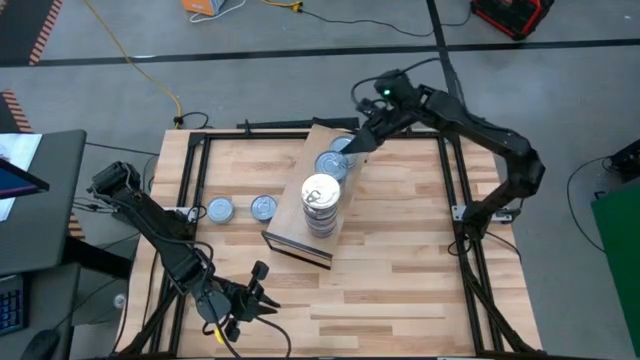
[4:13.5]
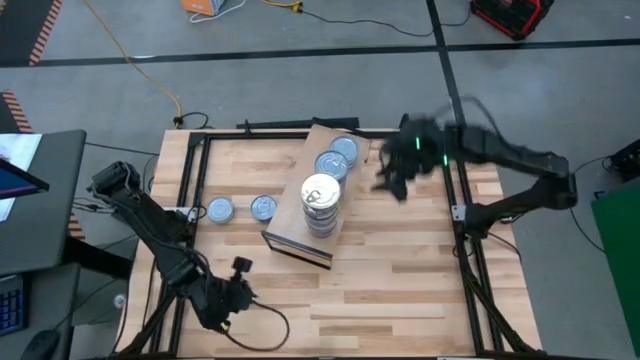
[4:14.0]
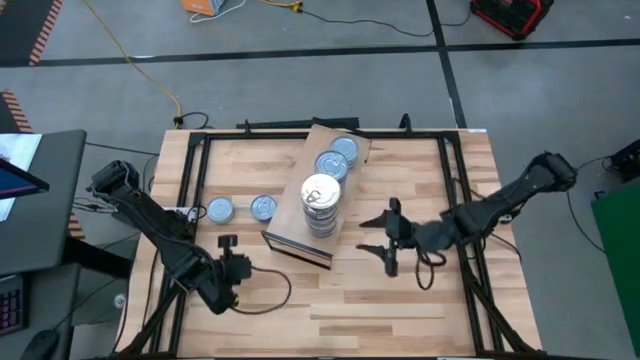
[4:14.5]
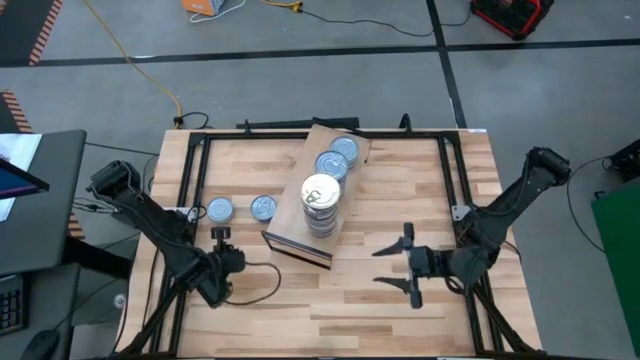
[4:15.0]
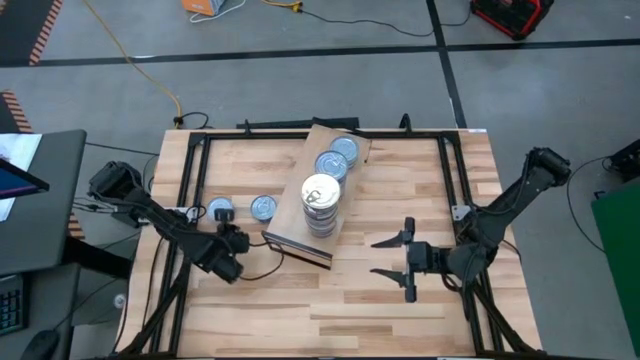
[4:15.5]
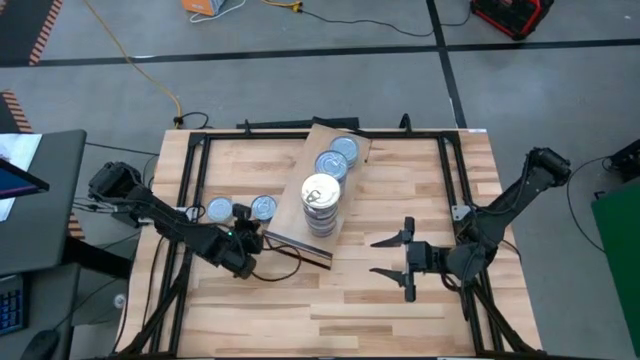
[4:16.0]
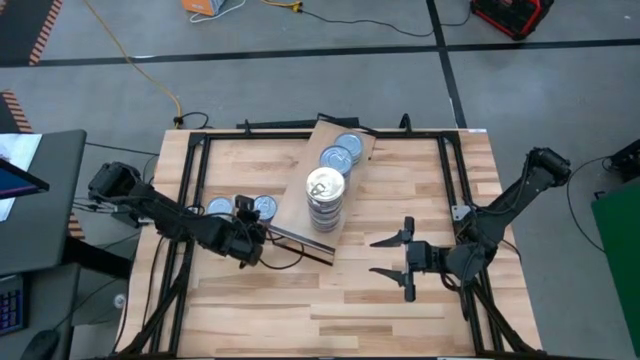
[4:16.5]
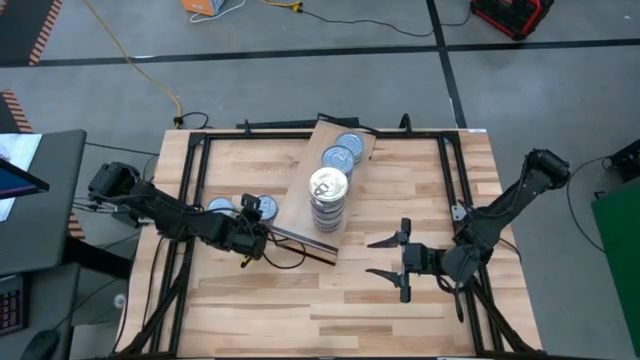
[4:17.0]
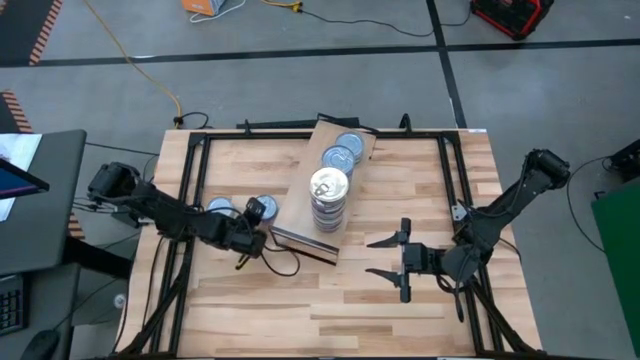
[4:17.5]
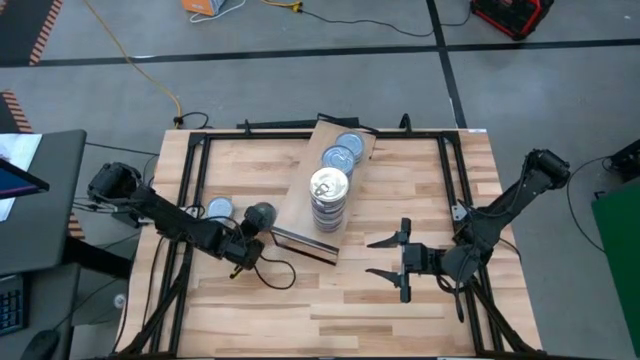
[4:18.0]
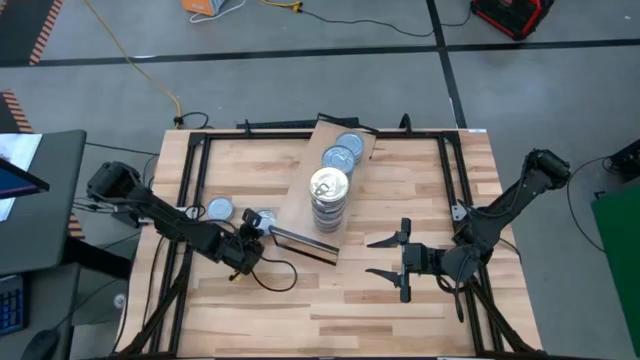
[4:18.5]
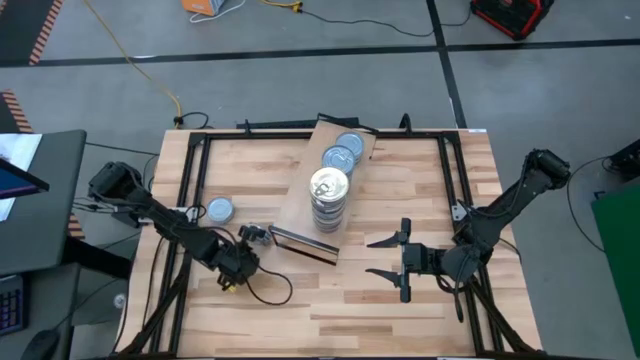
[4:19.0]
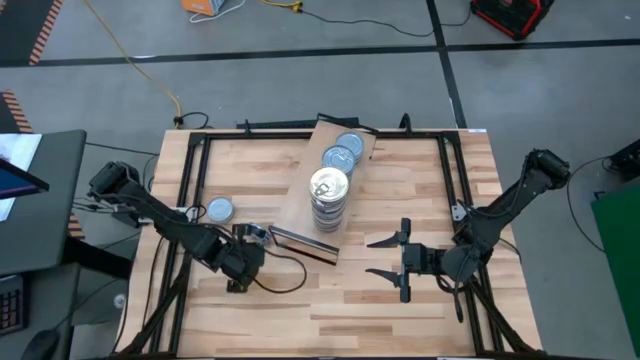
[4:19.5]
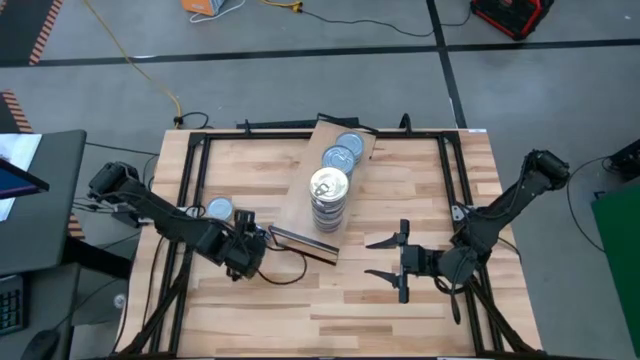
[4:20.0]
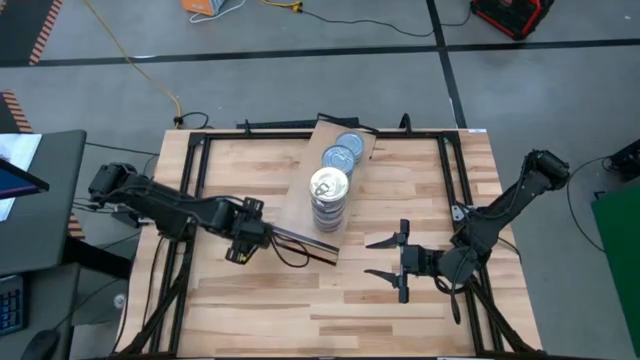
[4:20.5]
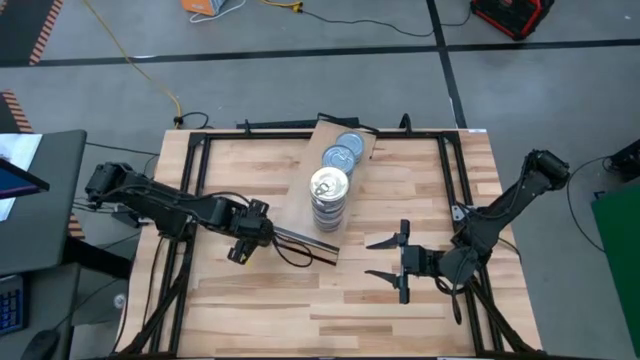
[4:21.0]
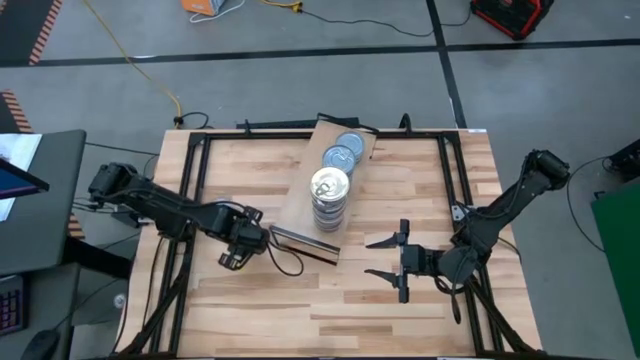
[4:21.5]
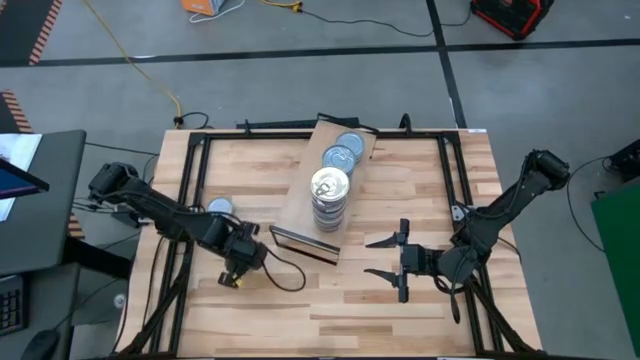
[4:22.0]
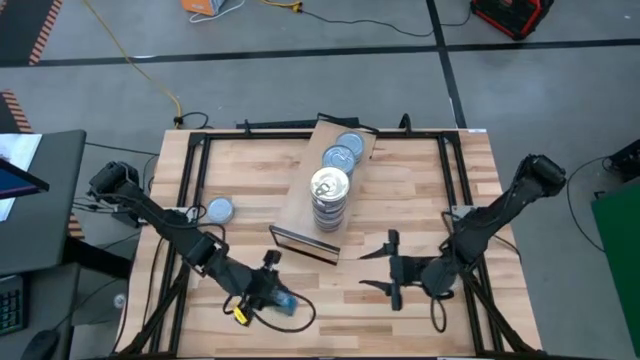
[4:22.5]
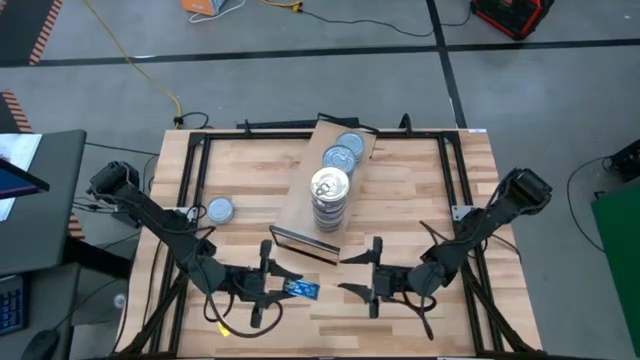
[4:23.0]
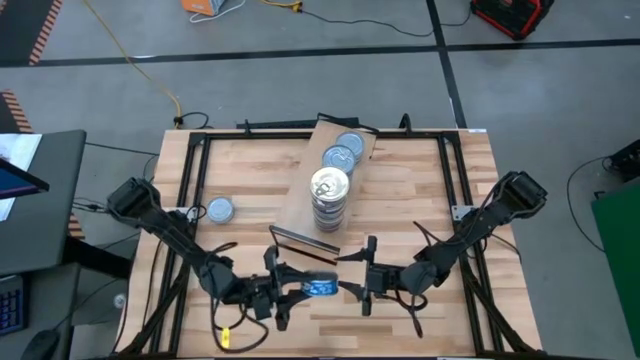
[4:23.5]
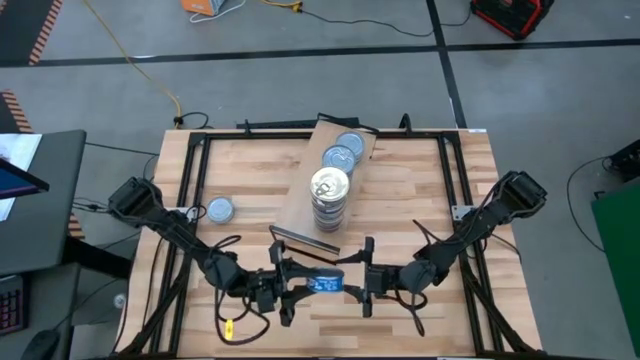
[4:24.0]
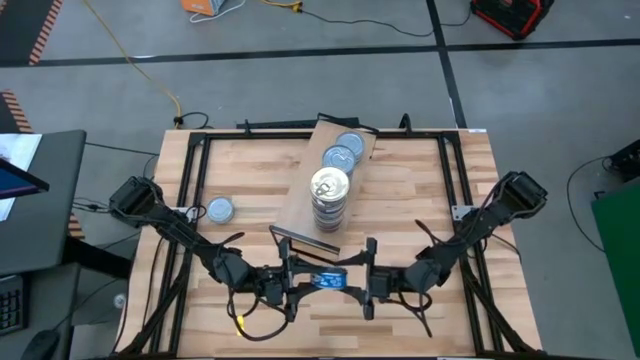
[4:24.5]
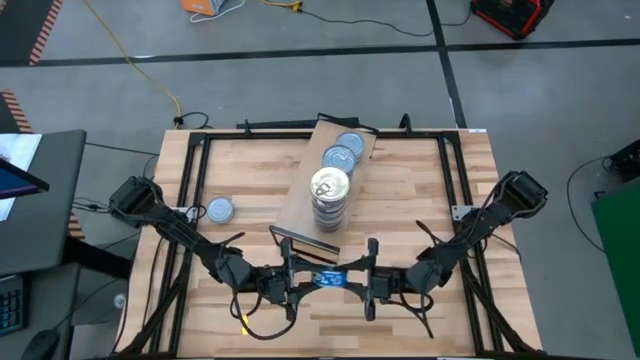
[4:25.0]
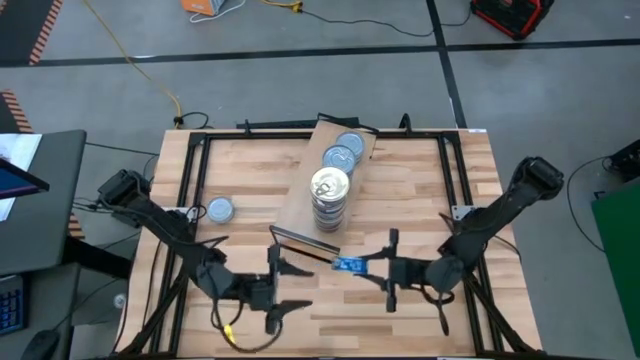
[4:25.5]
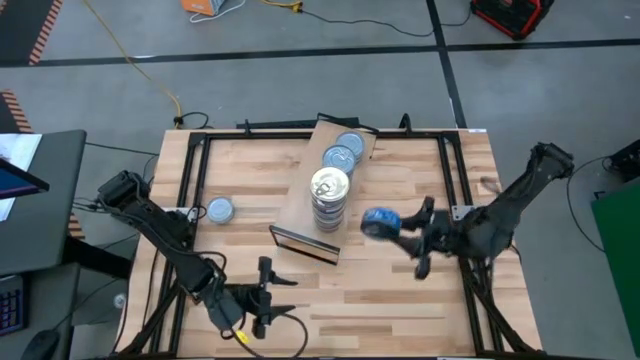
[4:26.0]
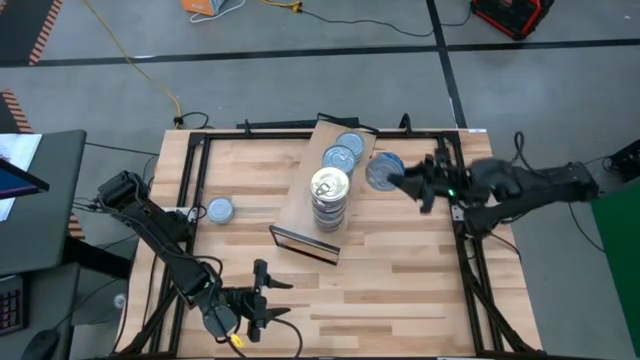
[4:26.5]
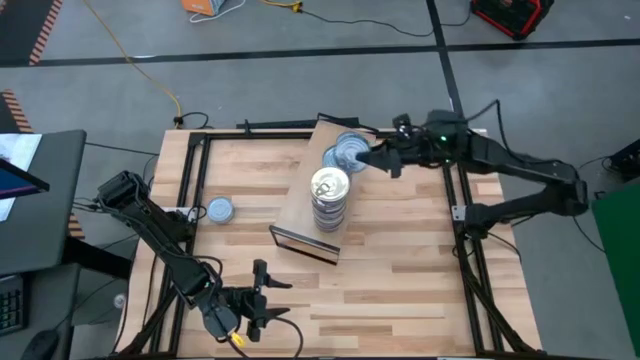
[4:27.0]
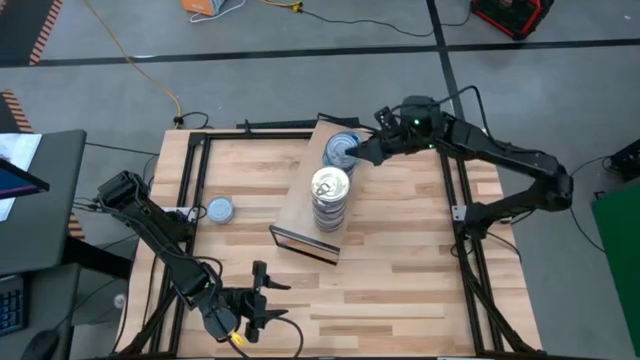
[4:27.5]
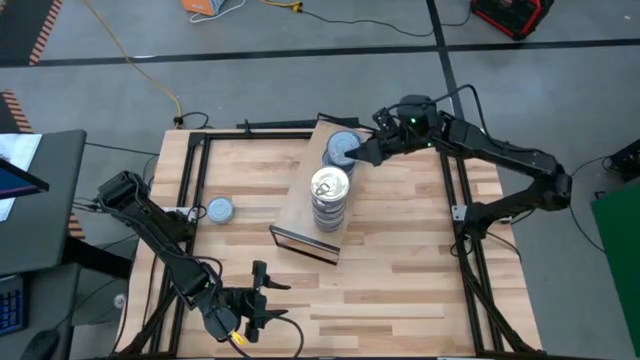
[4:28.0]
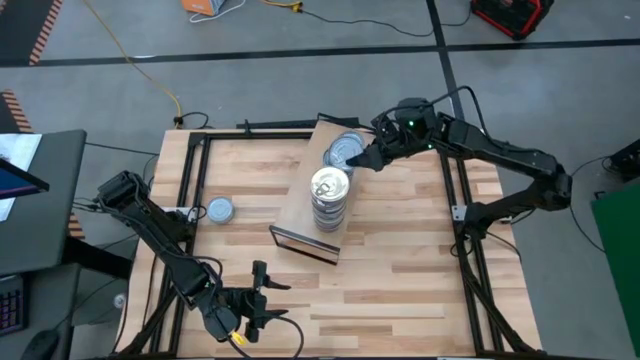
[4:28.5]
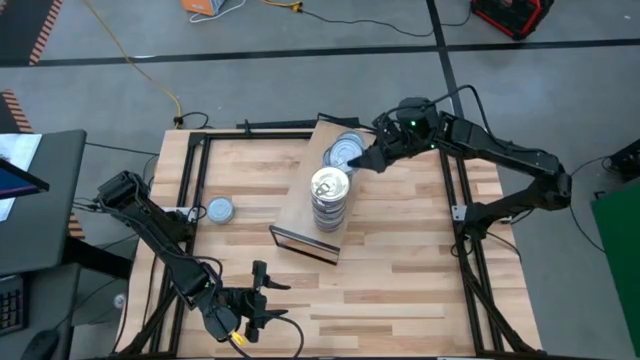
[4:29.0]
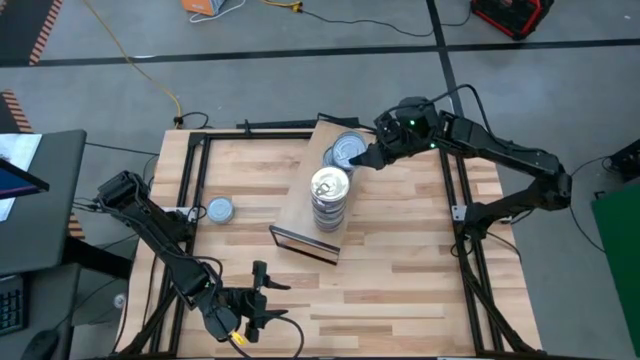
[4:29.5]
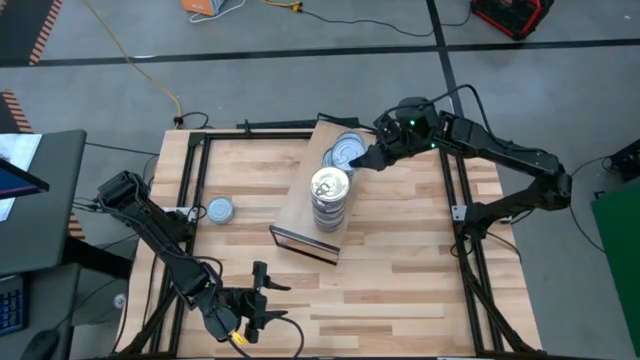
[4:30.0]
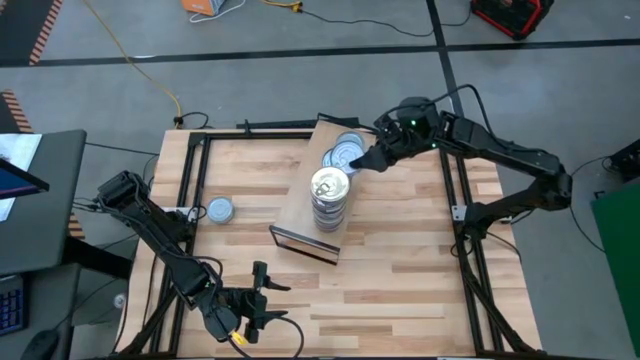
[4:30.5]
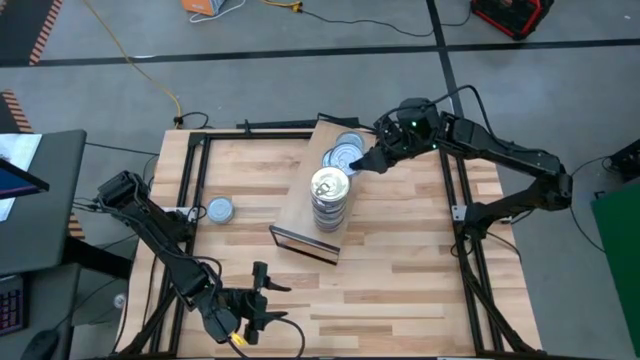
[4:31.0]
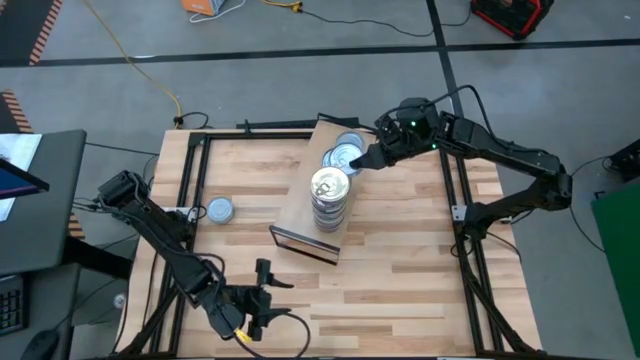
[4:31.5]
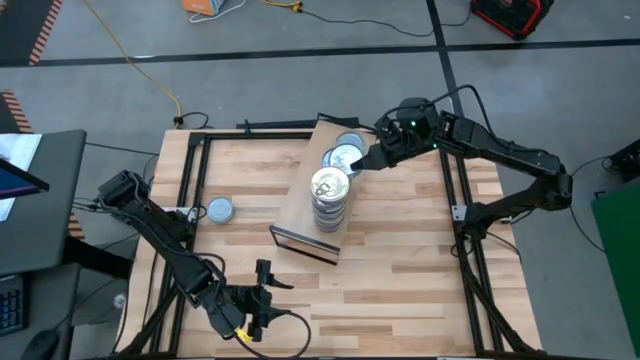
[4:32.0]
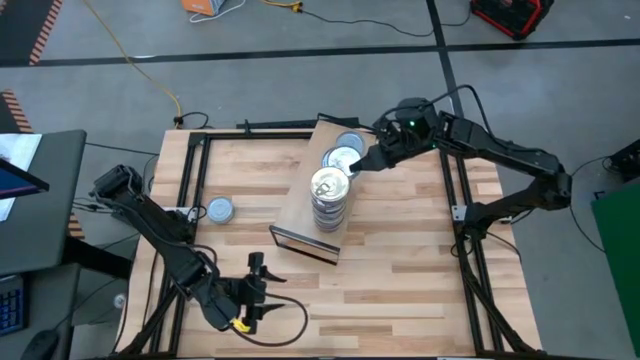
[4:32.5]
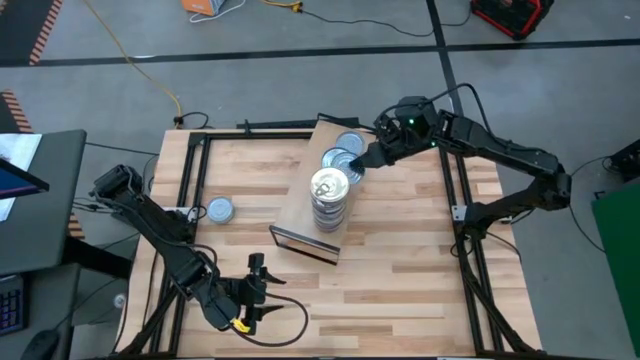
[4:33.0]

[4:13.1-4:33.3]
Task: Stack canned seafood by type on shelf
Stack the blue tuna can on top of the blue tuna can on the shelf

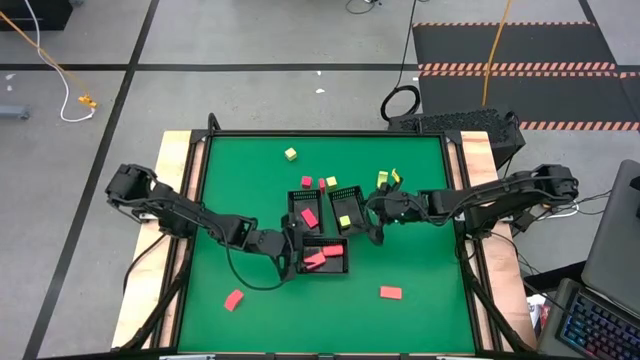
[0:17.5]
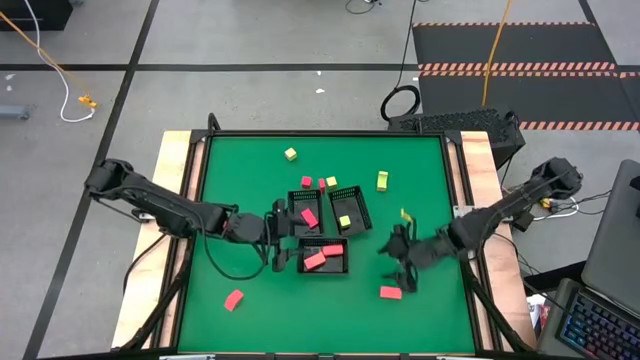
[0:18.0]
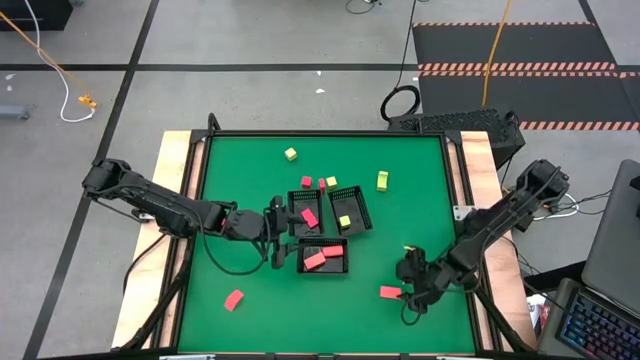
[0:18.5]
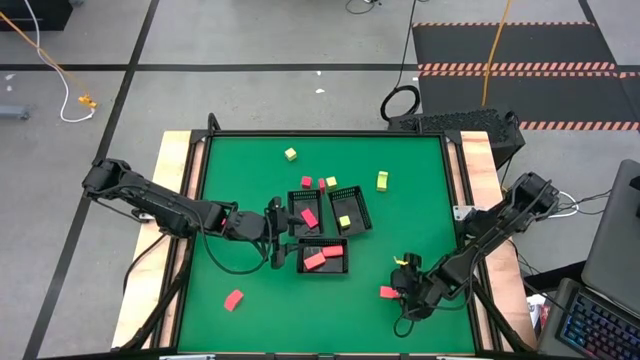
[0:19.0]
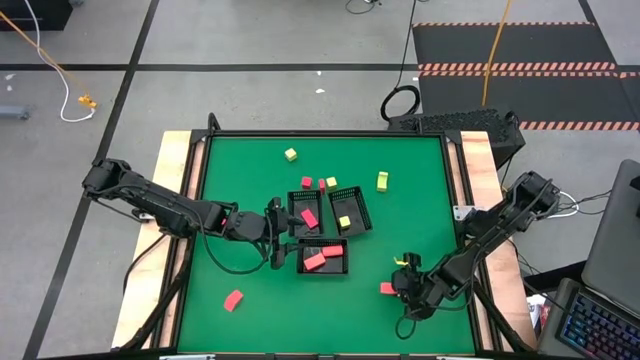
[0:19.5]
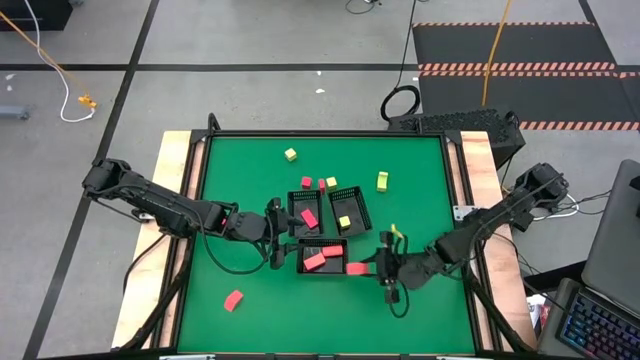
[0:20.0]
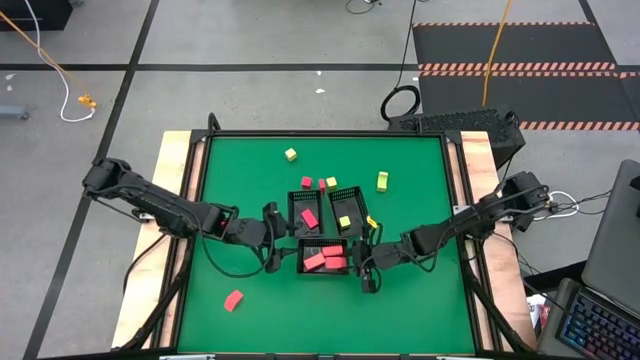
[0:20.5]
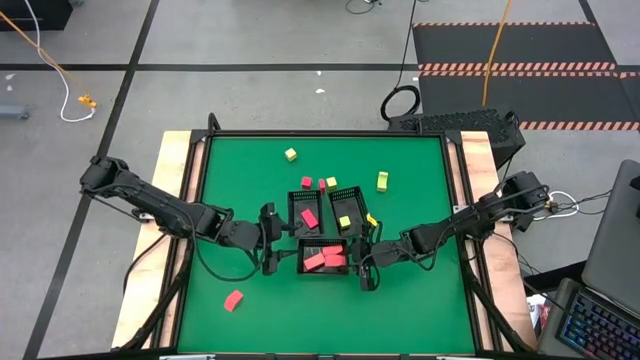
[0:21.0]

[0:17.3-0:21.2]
Task: Sort & place blocks by color
Put the orange block into the bottom black bin
